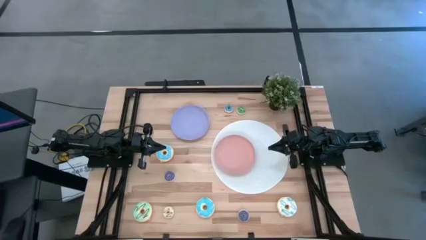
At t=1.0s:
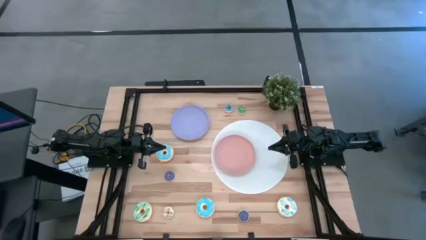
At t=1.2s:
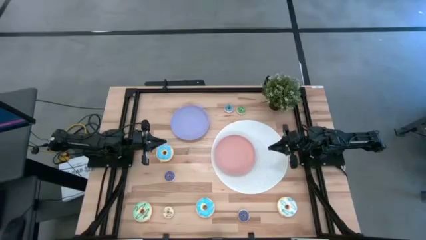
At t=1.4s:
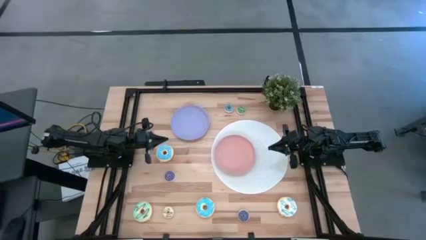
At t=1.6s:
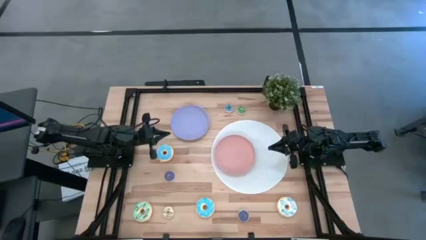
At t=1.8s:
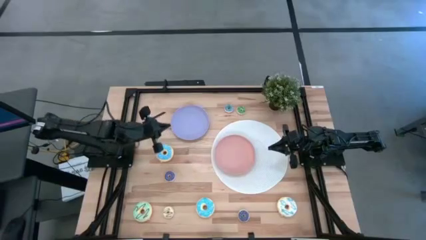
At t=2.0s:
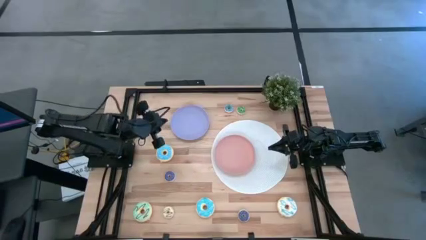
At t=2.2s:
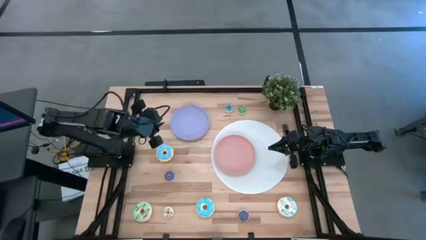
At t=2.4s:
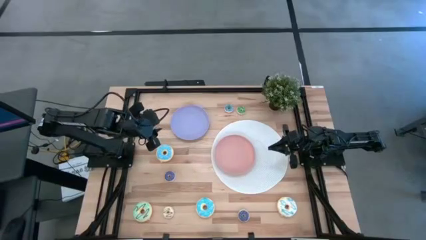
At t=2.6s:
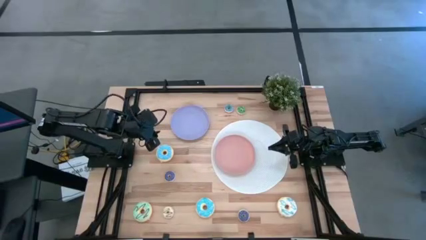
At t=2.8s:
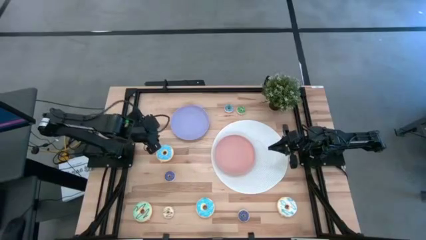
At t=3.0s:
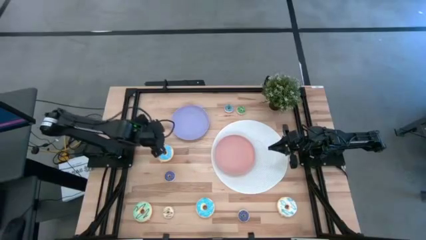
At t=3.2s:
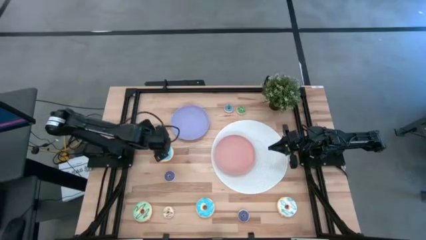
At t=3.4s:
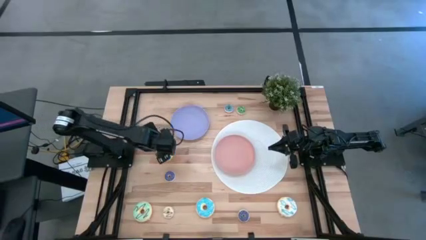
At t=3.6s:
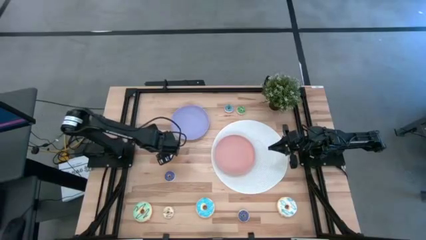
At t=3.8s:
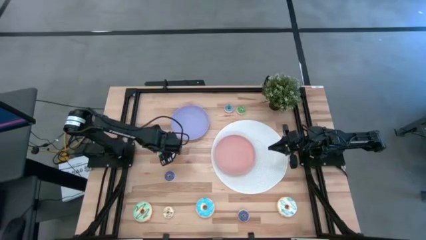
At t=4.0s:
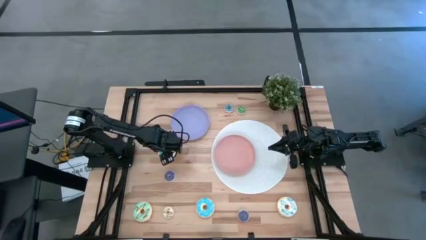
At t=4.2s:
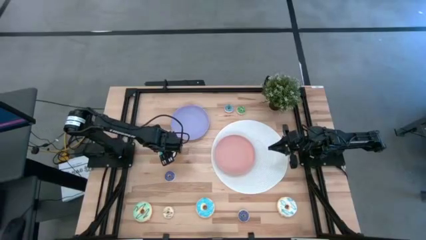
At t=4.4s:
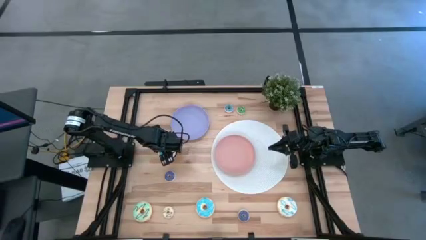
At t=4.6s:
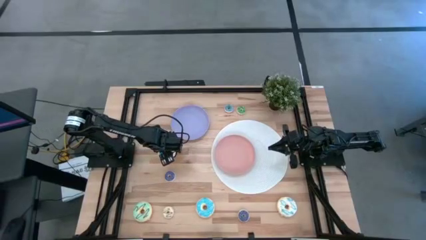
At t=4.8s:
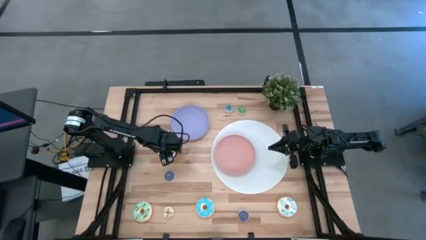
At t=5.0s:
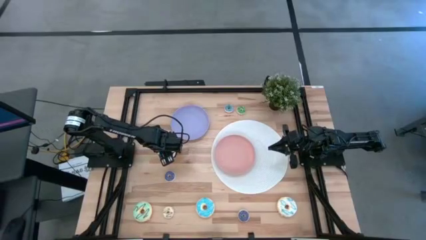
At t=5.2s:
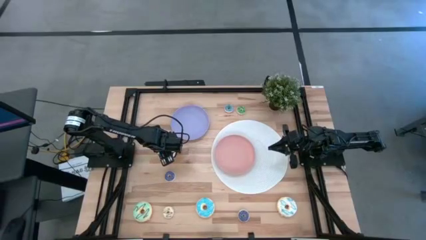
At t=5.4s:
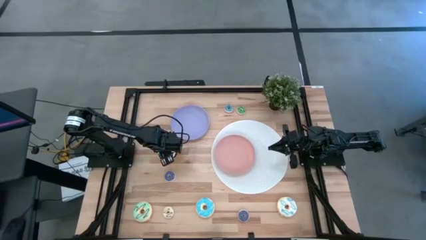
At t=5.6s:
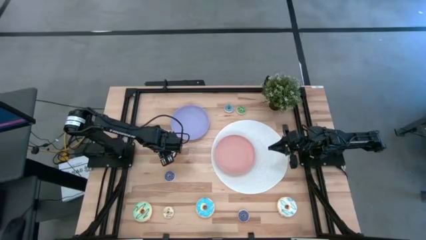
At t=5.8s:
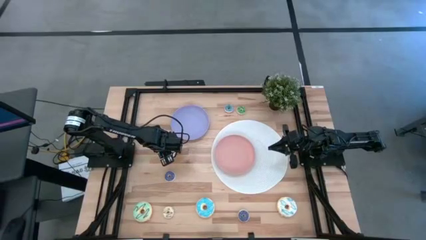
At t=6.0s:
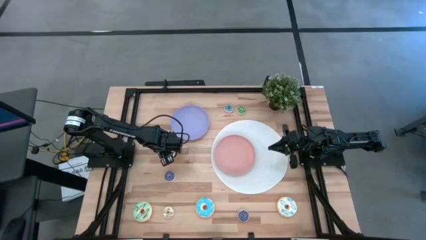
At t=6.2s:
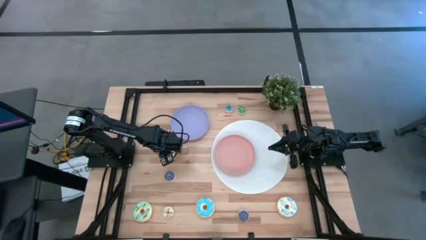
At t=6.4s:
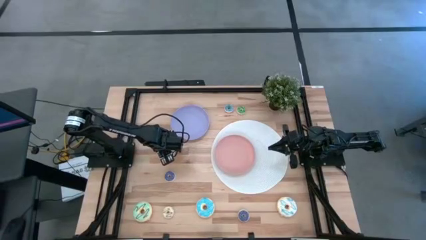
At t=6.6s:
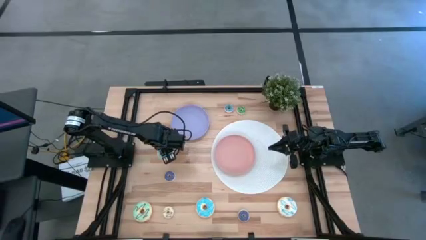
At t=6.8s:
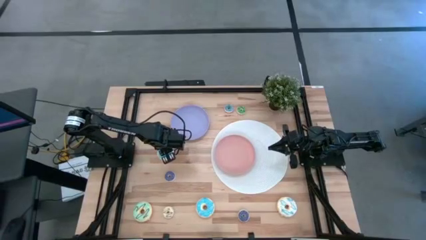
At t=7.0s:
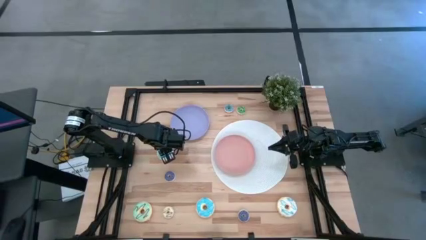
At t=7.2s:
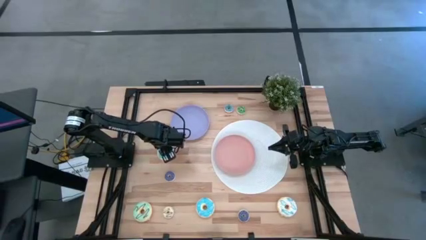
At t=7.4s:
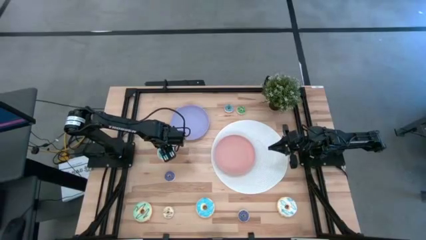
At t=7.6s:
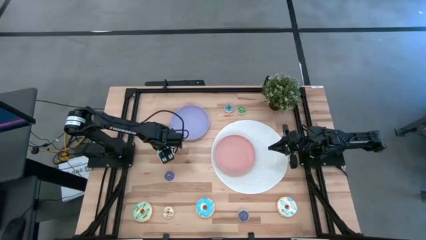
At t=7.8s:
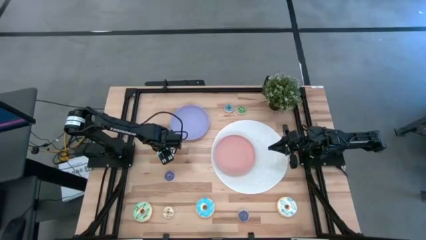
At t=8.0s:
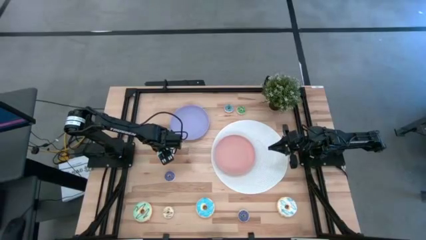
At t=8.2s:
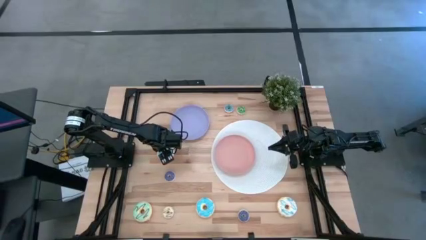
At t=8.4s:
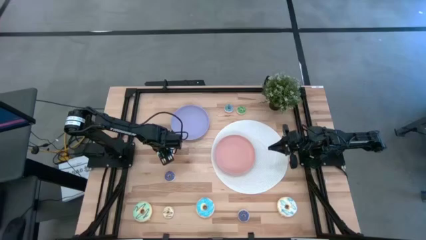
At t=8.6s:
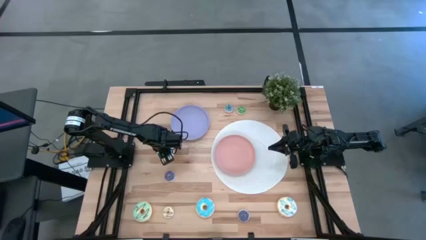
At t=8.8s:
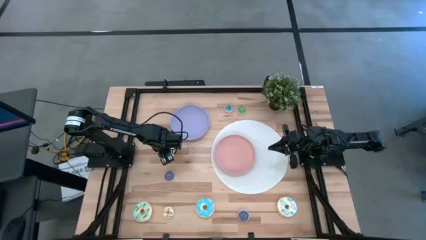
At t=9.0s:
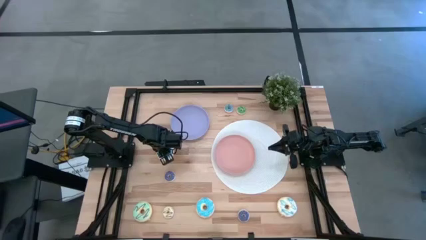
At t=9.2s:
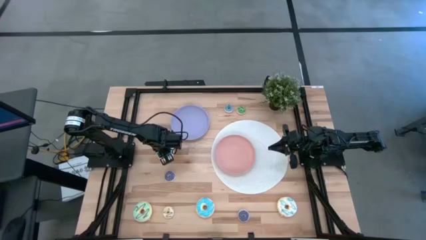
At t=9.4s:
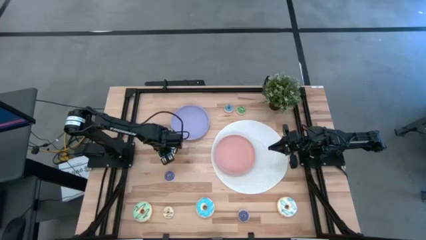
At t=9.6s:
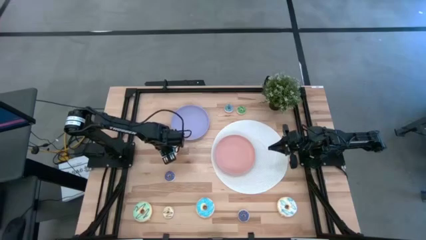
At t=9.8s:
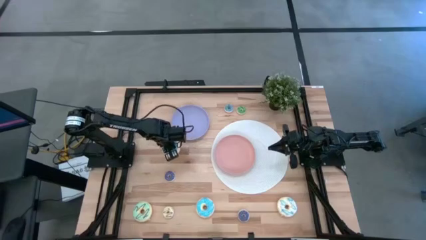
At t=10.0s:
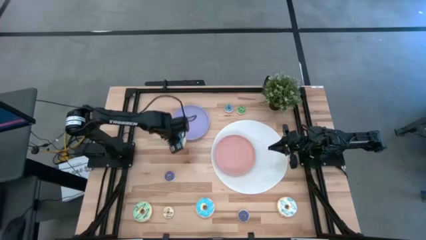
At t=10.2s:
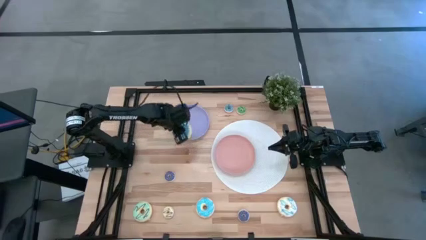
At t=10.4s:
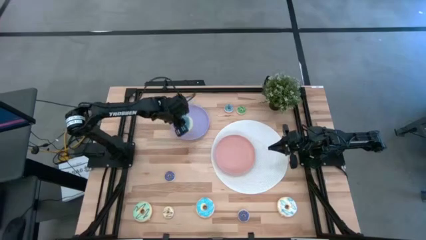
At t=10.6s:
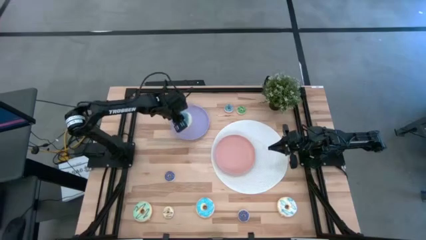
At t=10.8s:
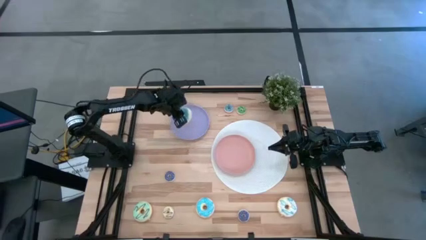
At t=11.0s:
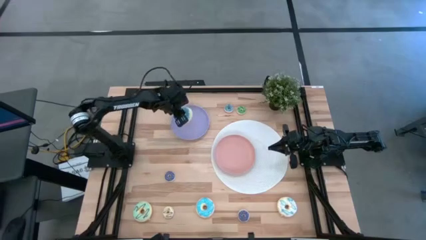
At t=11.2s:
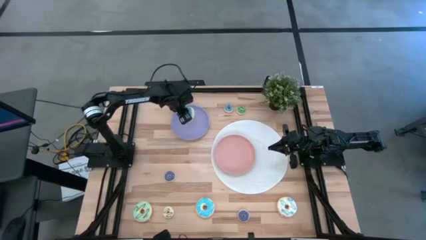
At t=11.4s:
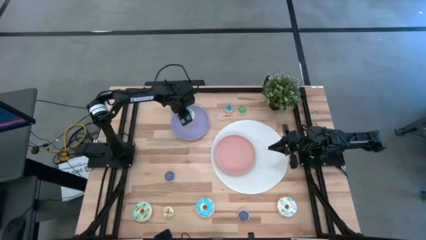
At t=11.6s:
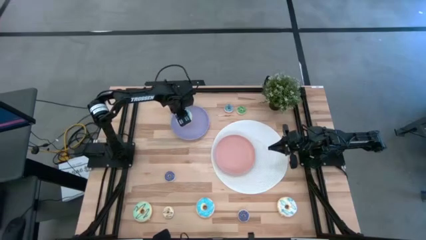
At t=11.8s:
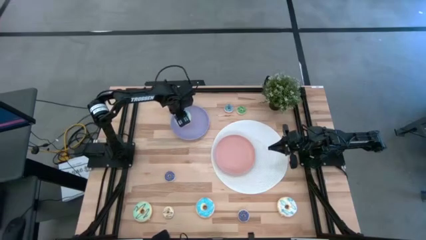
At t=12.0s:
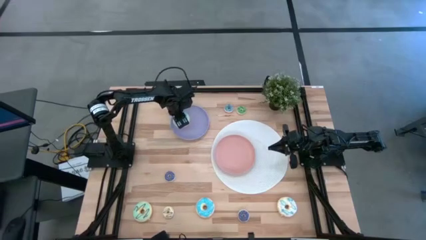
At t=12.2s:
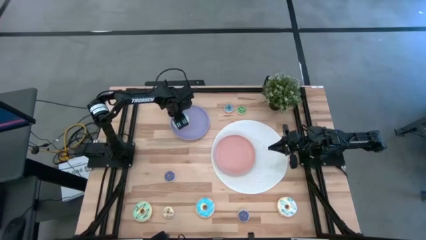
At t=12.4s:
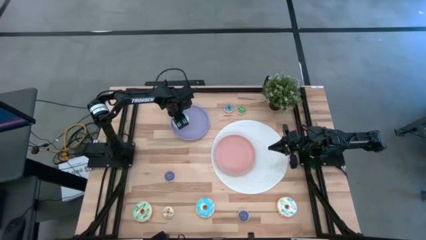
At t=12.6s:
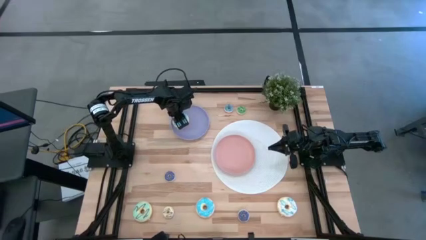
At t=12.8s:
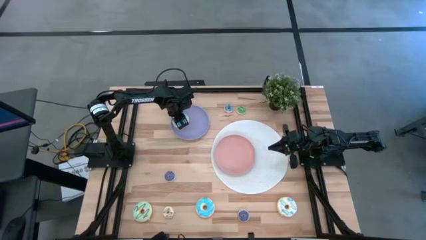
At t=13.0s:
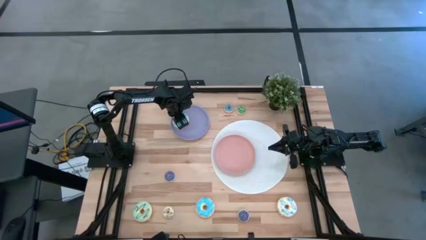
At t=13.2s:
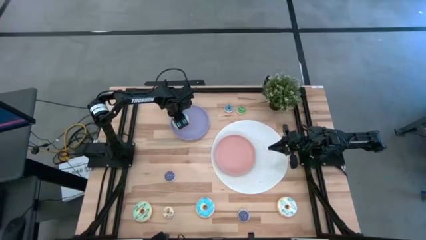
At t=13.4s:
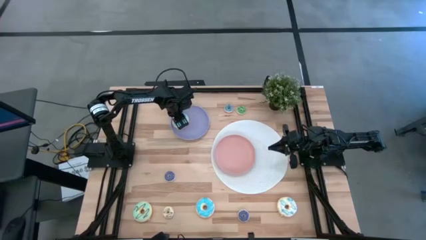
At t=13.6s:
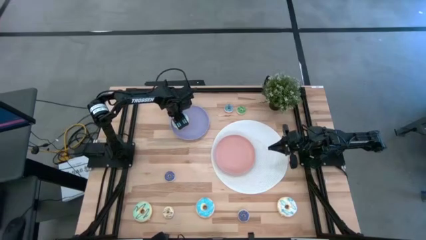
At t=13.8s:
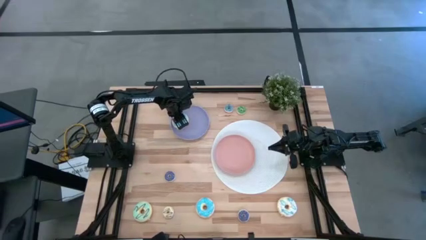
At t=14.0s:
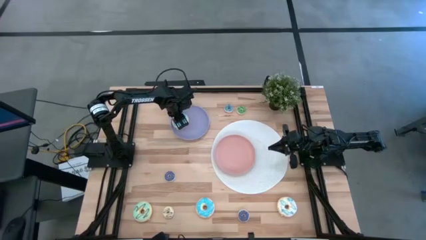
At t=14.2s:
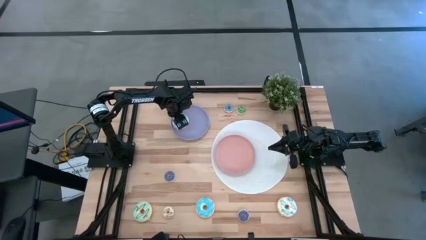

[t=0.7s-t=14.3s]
Task: Pick & Place donuts
Put the top big light blue donut on the violet plate
